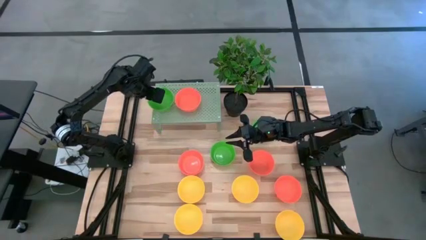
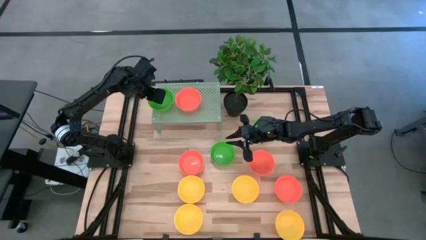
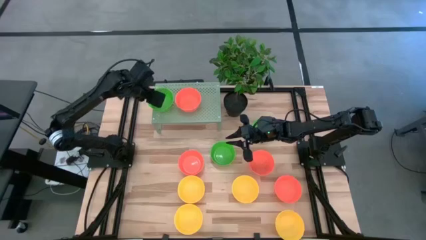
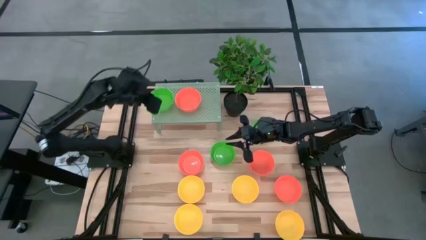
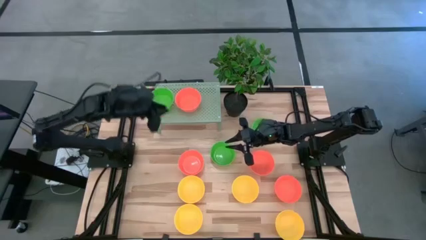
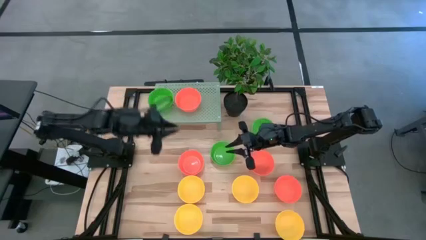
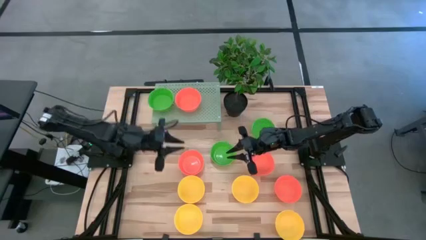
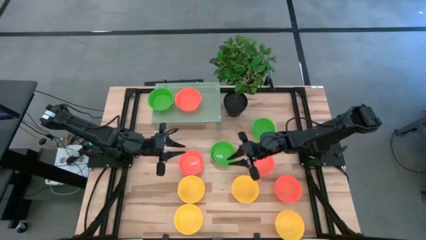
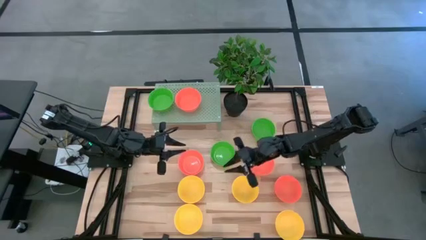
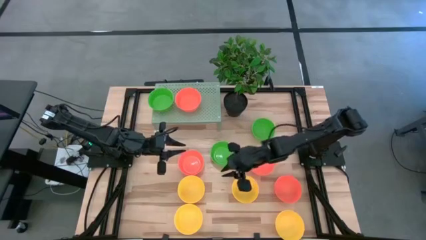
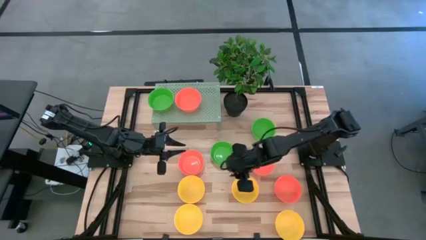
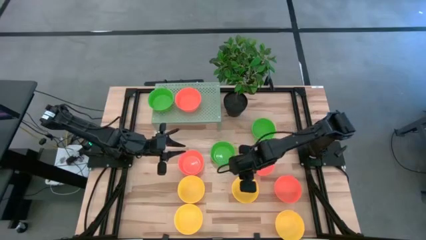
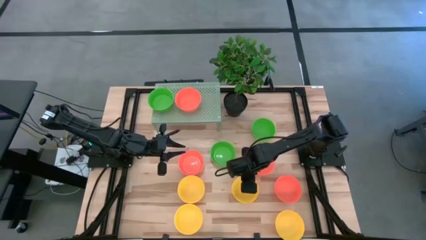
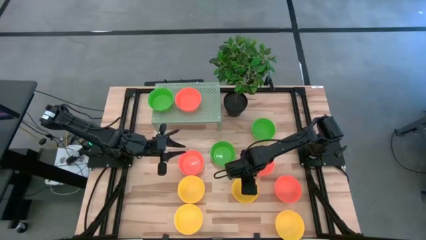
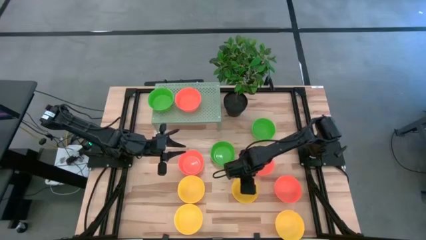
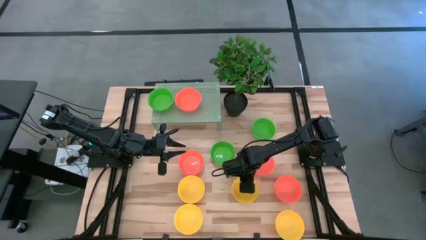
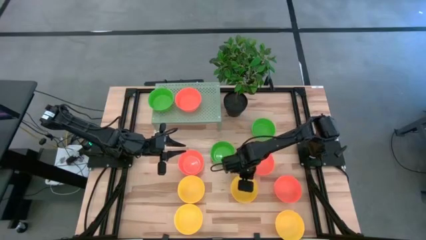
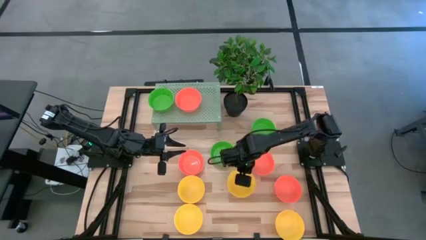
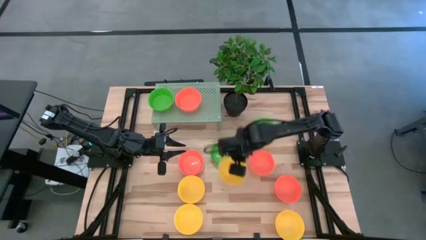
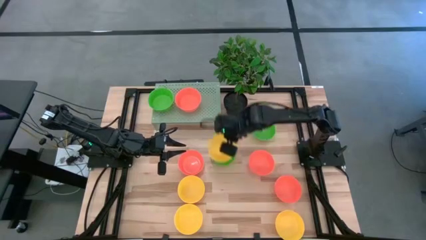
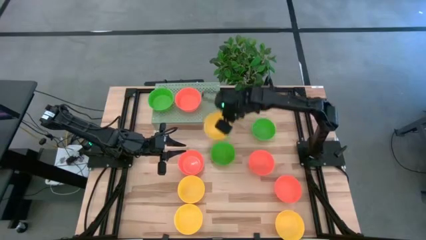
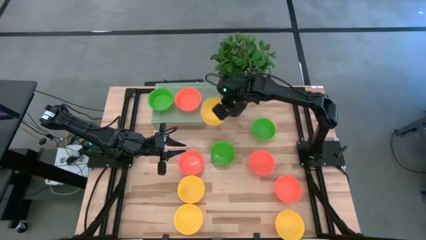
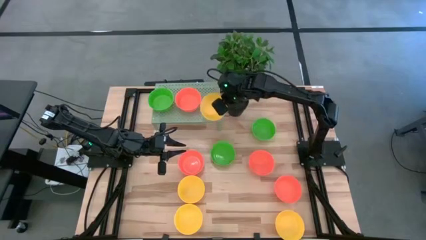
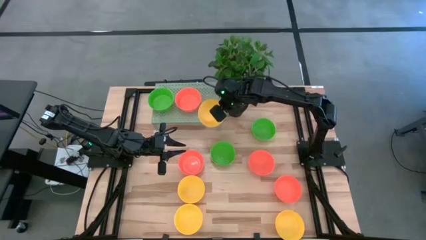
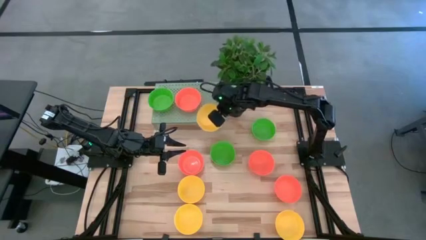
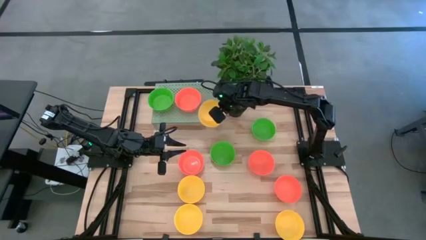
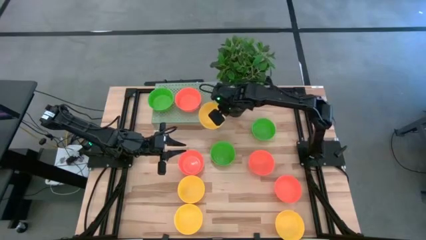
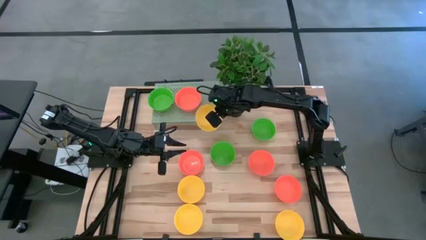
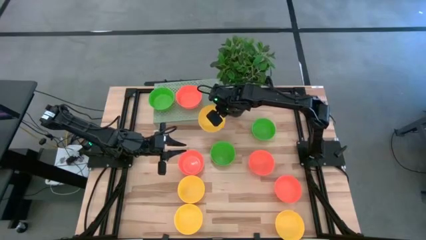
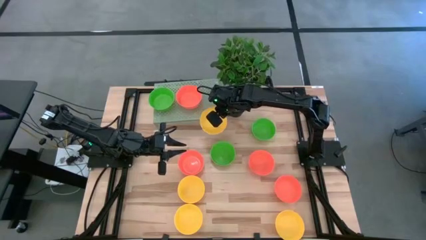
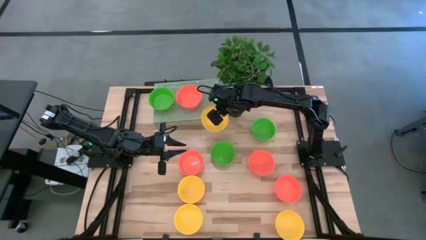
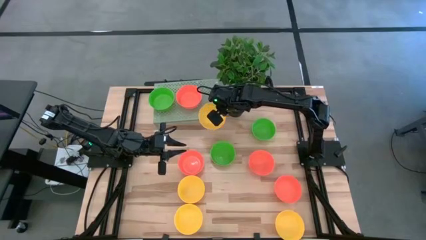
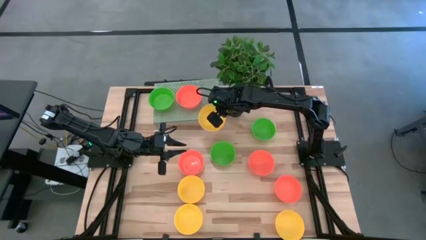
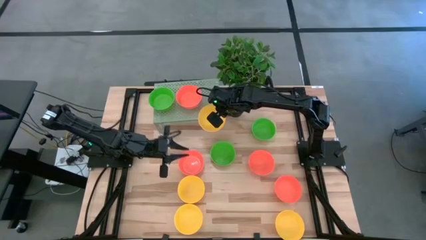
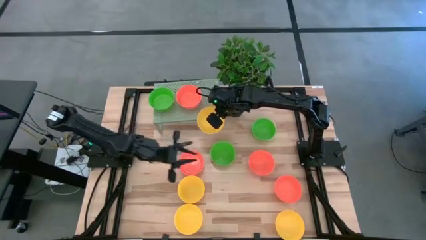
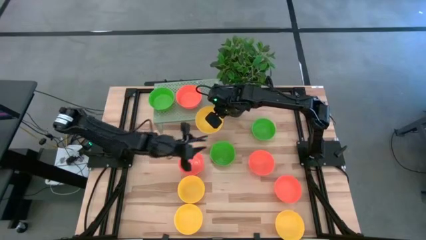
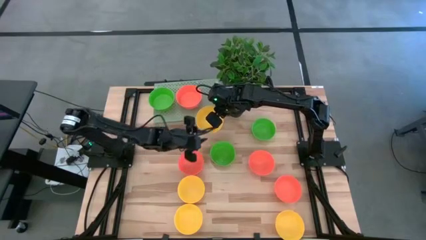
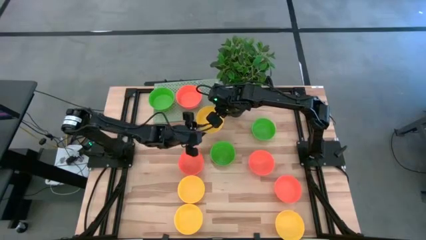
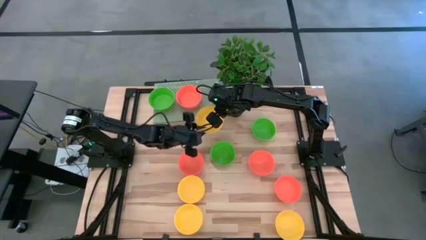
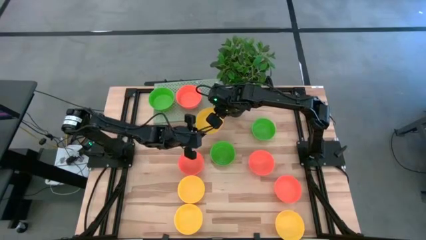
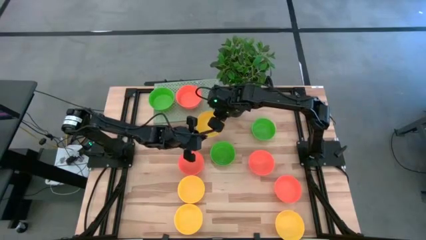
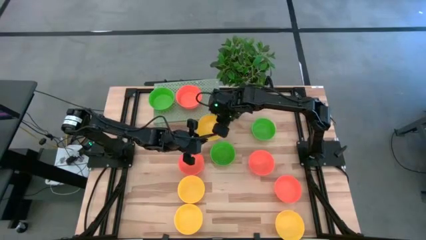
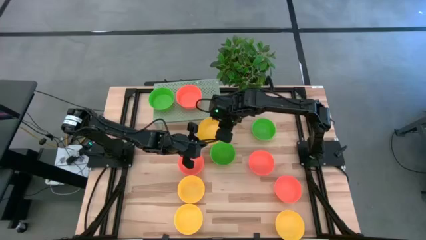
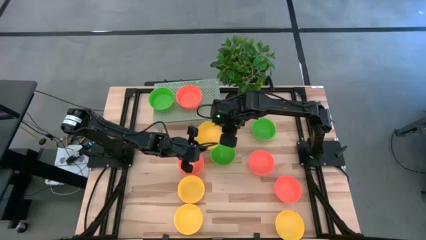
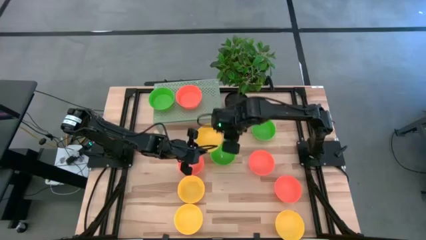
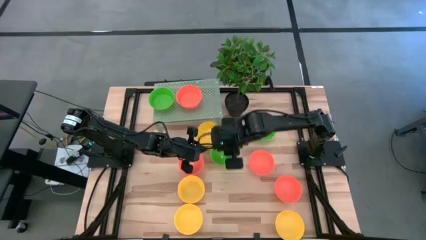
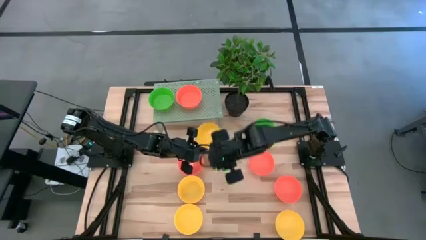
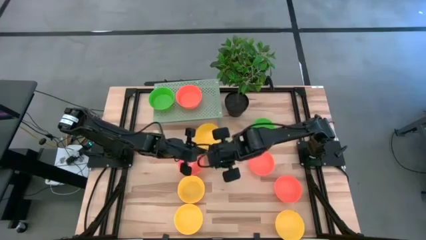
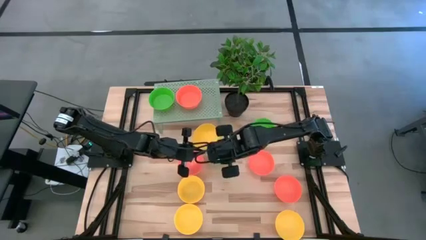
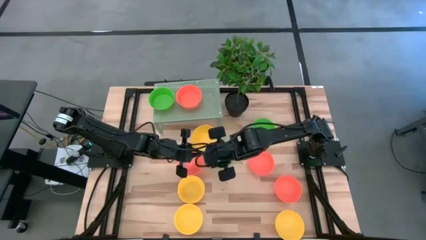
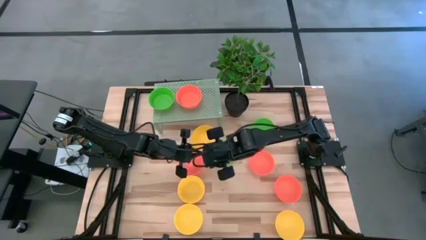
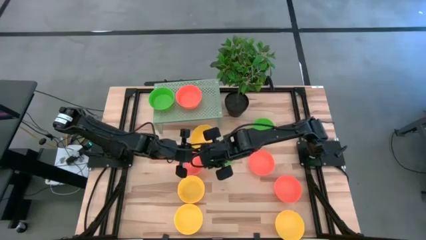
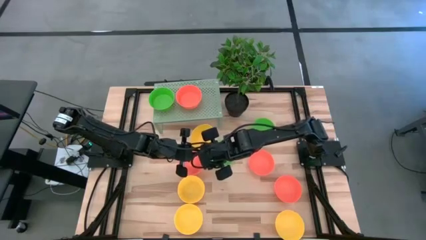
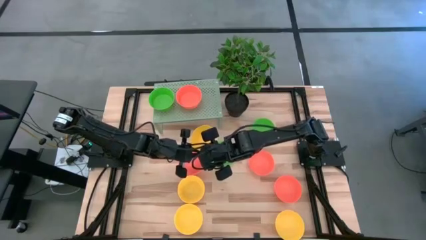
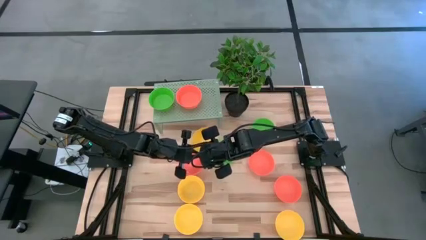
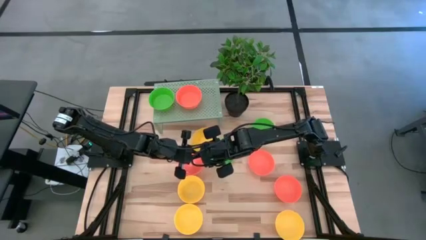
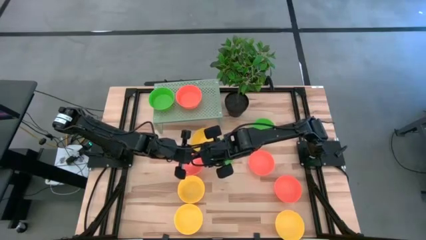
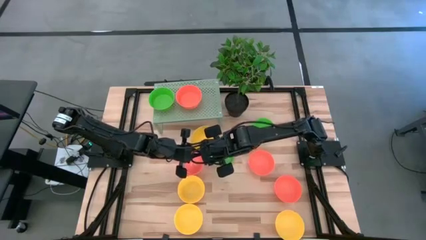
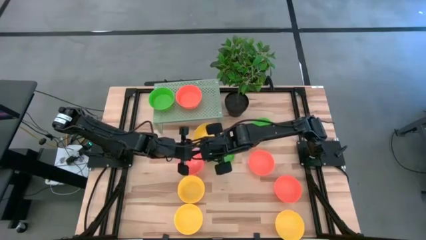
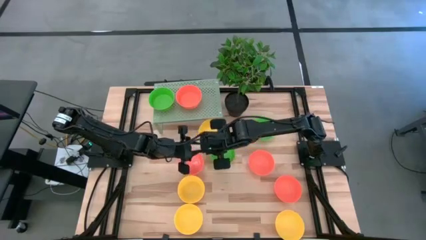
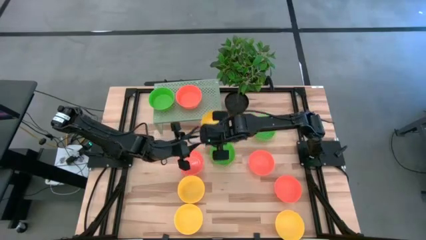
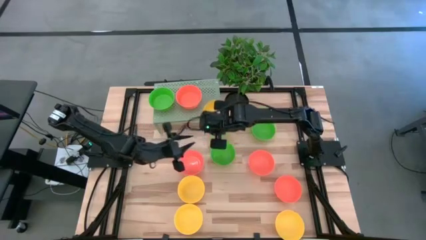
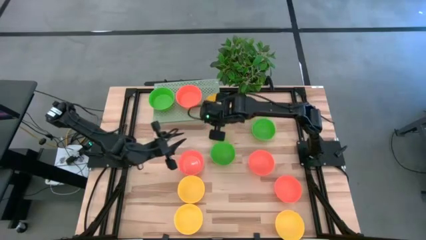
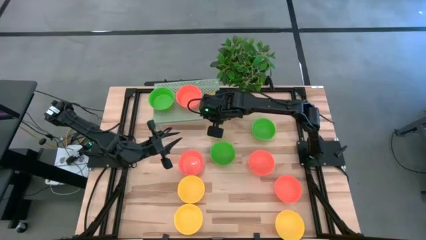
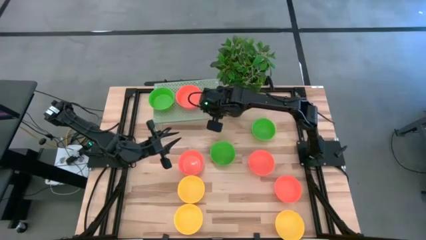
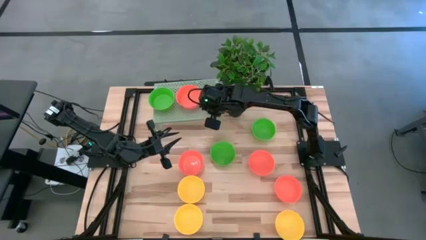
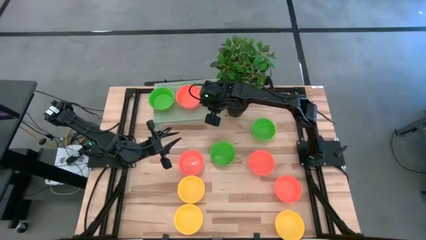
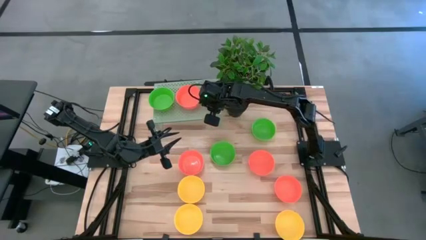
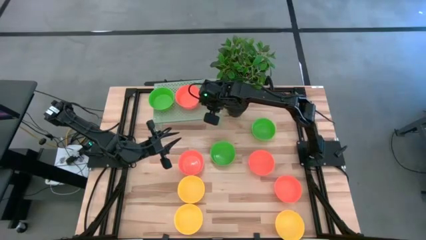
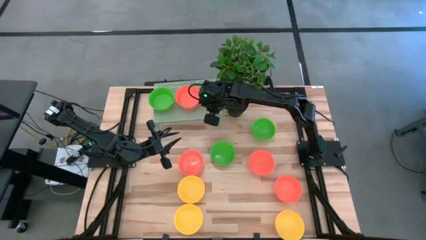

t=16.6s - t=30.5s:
Task: Pick & Place Mini bowls
Put the yellow bowl on the shelf
